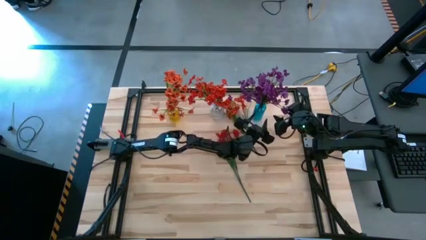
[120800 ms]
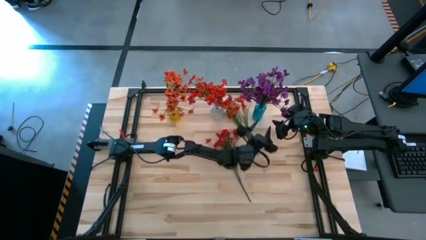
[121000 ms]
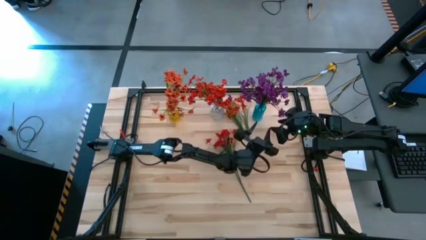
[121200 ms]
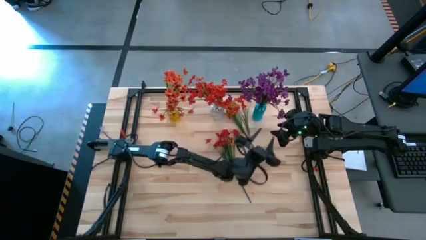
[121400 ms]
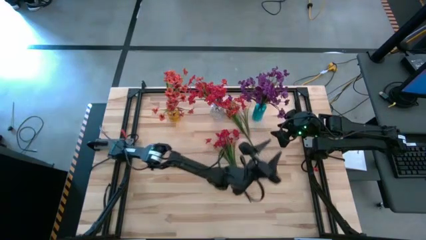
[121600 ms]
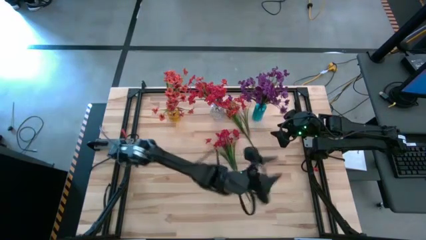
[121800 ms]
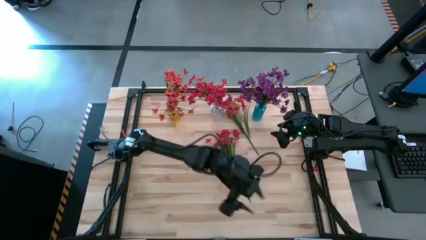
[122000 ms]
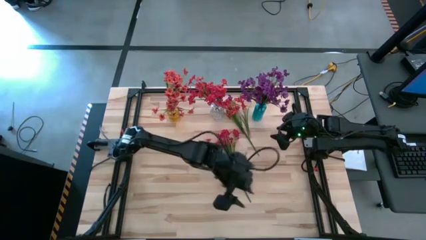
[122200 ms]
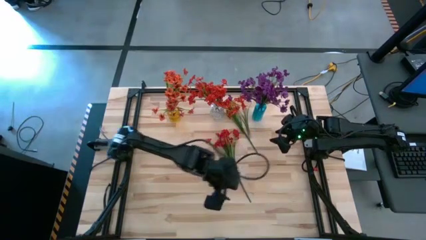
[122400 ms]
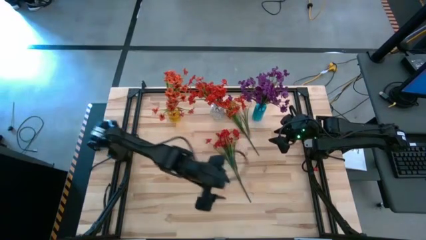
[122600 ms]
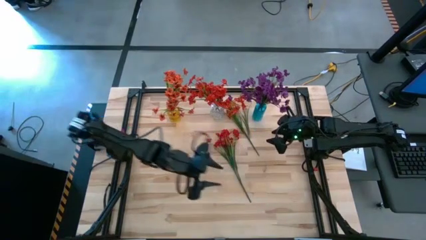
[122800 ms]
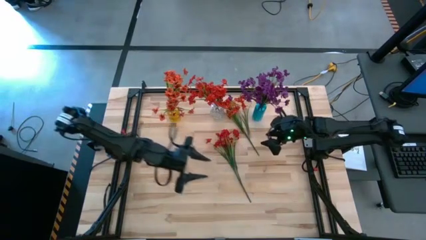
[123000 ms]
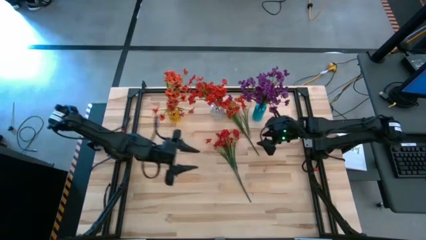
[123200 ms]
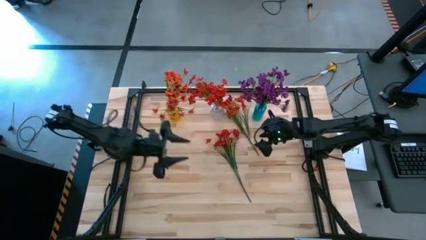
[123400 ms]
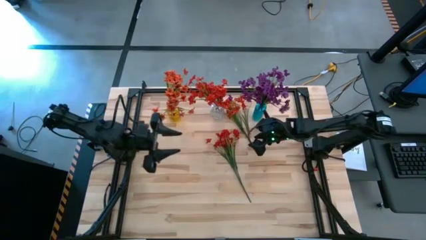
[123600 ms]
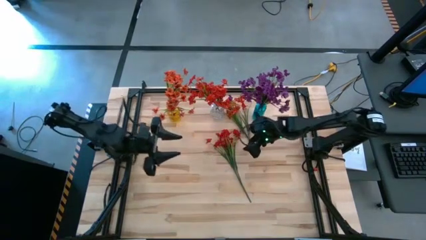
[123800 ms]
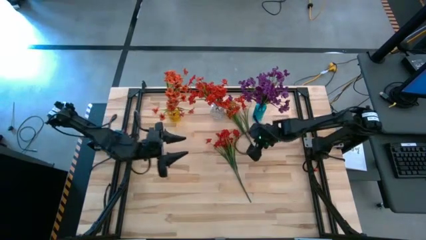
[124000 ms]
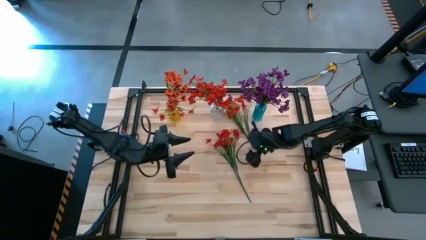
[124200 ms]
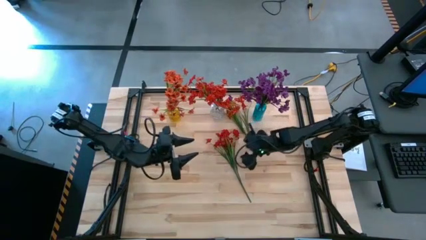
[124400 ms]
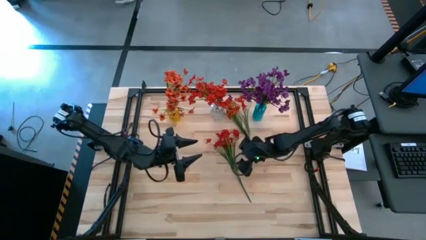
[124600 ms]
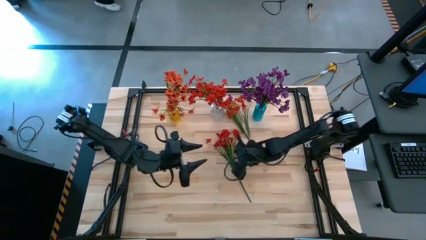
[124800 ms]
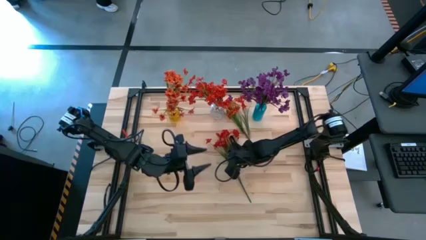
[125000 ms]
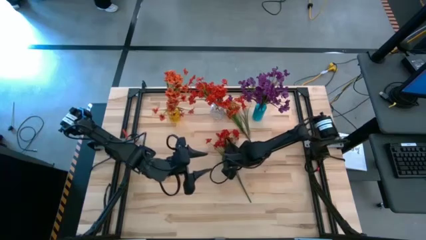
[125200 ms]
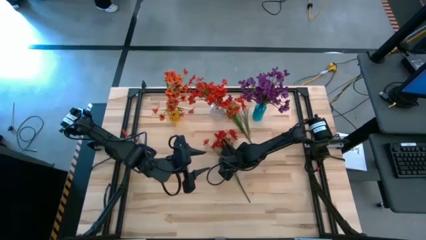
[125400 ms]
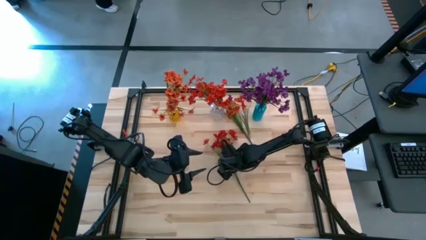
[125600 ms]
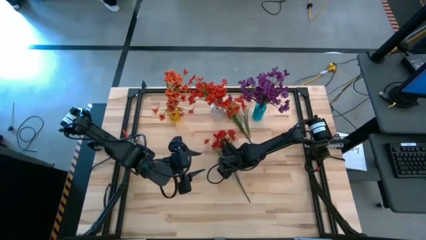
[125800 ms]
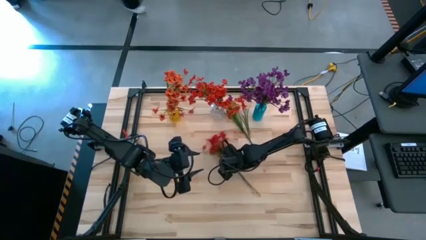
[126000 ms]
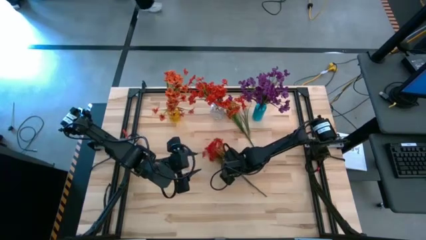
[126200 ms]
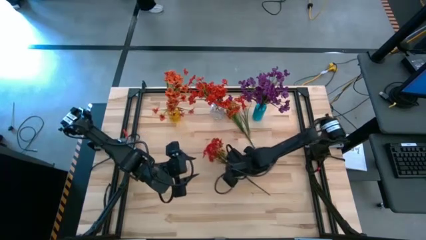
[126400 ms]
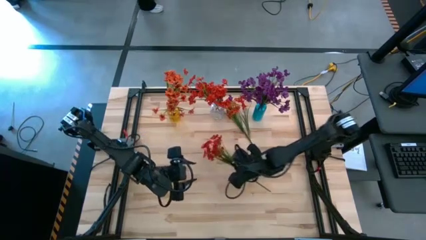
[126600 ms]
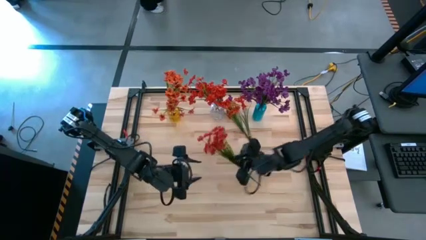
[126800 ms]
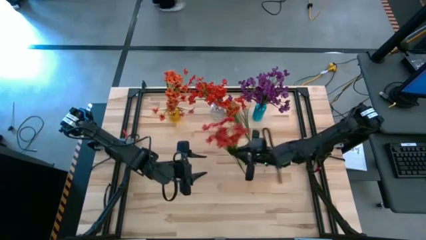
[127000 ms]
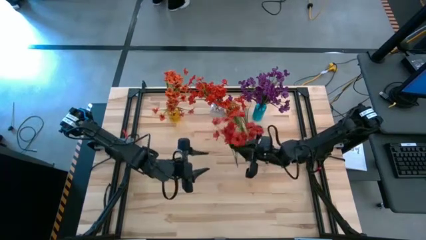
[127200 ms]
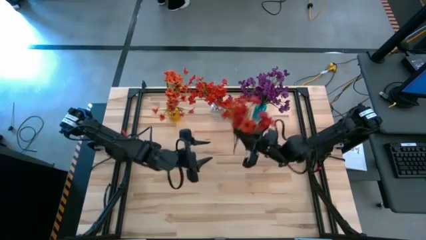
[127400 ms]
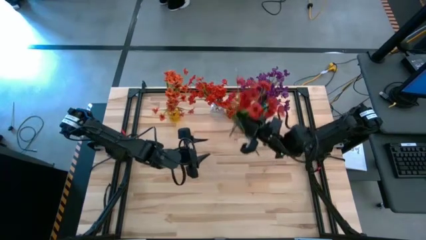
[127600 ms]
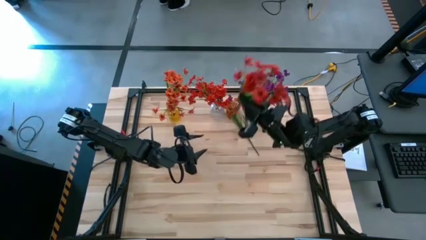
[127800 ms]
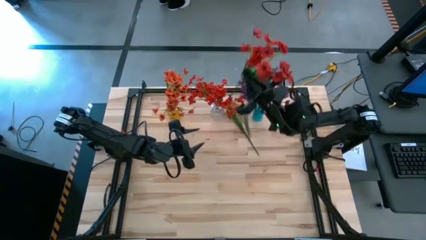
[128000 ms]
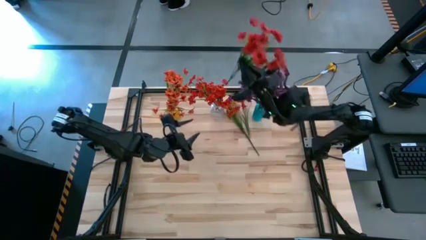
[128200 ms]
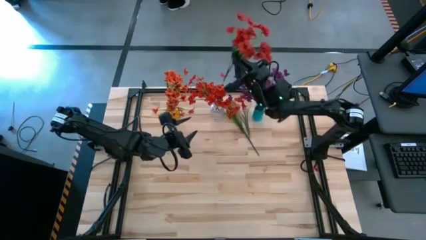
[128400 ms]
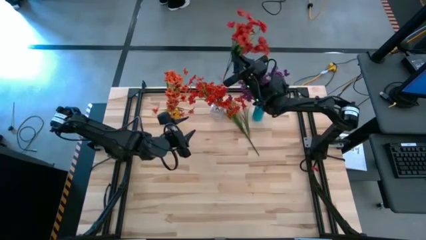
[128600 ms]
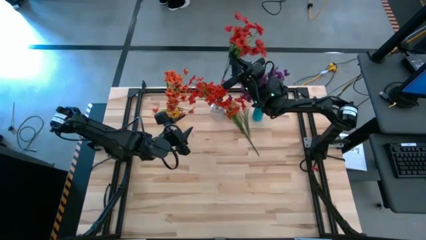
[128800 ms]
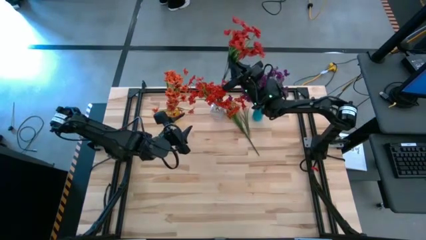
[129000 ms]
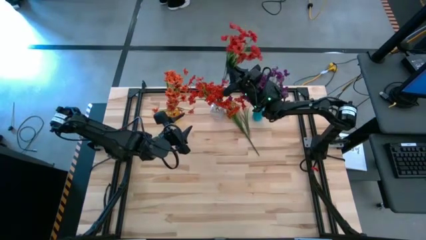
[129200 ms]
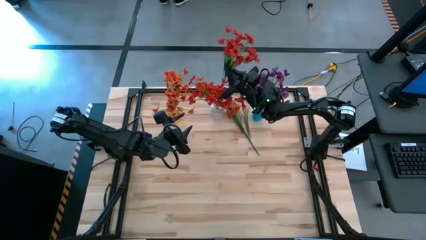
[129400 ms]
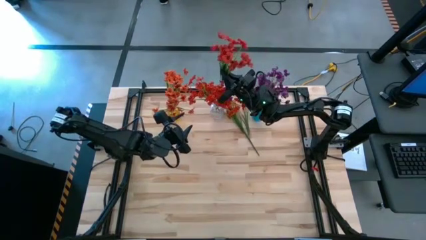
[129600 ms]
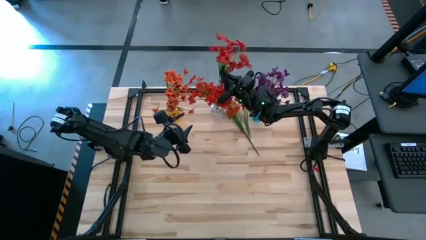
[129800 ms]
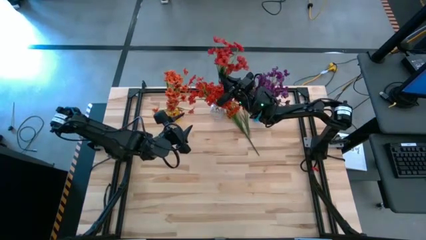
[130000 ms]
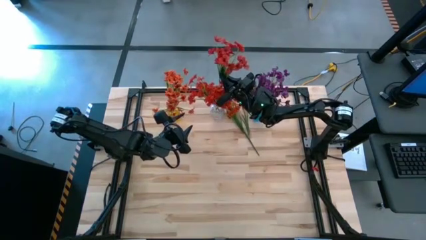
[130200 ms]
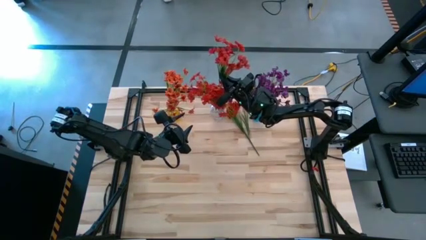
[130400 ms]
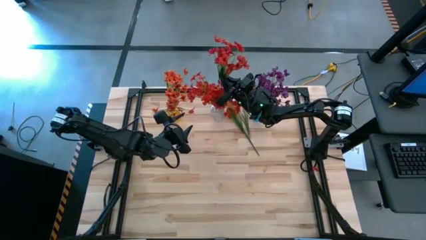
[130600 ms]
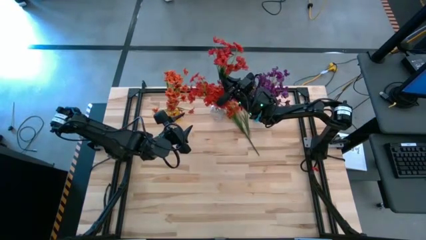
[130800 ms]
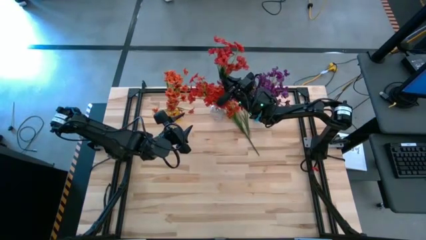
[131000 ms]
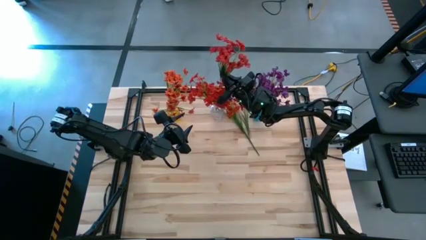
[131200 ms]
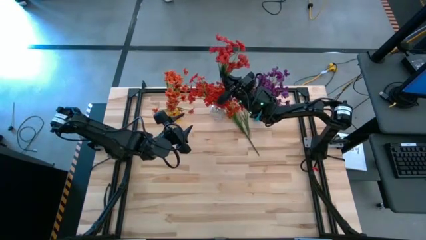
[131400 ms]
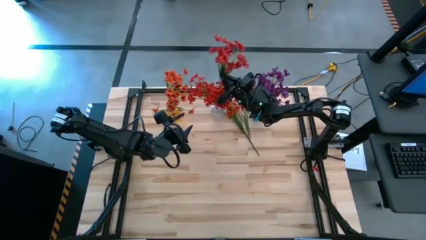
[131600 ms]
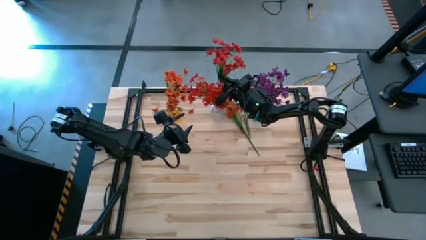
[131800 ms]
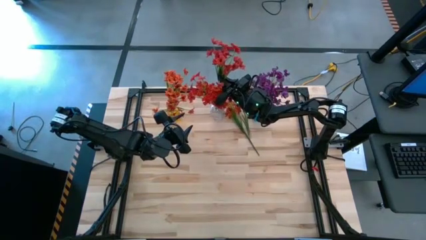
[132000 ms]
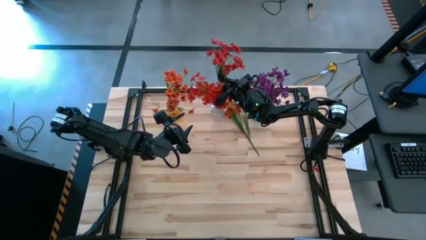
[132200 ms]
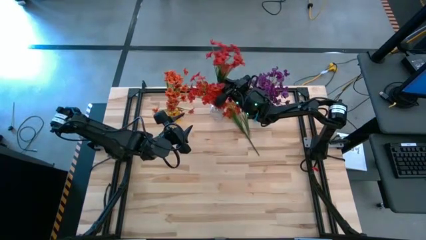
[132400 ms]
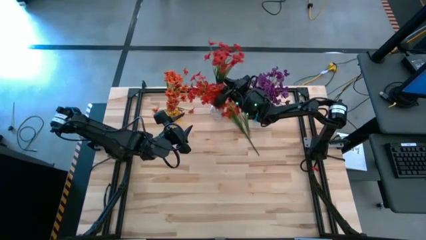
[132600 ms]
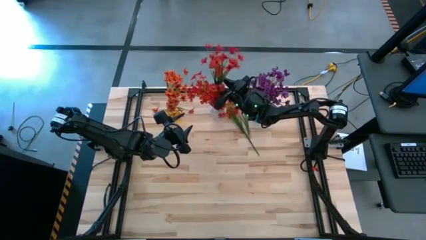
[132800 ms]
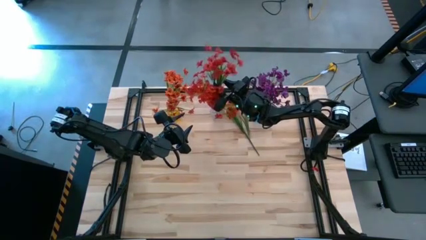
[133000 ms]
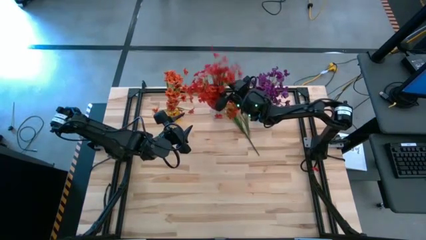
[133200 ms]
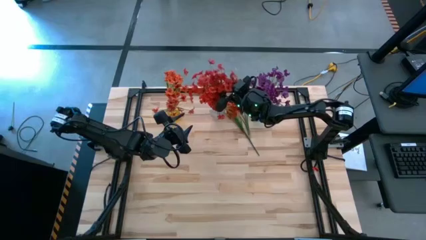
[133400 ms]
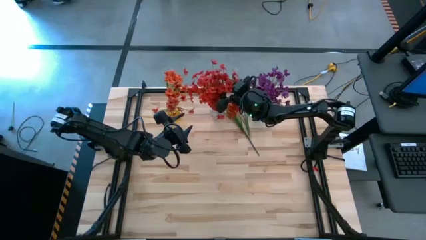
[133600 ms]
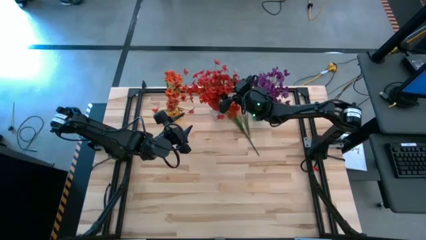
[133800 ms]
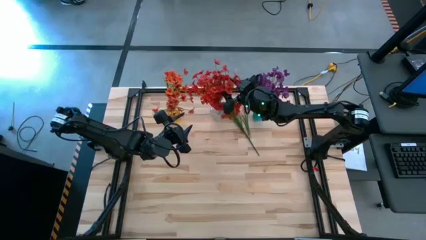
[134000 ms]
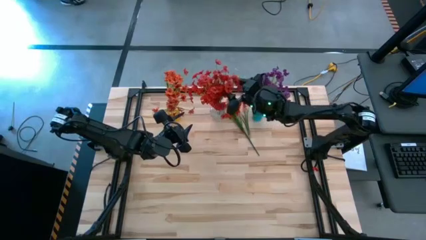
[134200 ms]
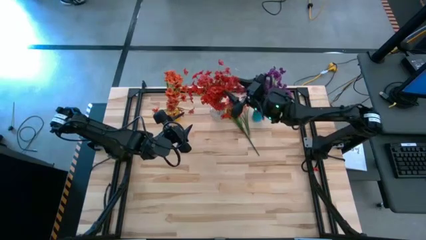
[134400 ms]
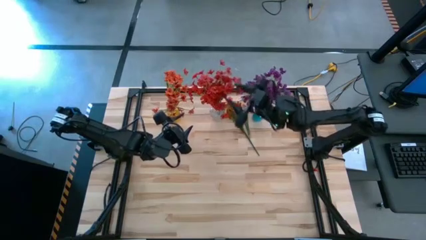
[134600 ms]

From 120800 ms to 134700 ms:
Task: Sort flowers into vase by color
Put the red flowers into the transparent vase
